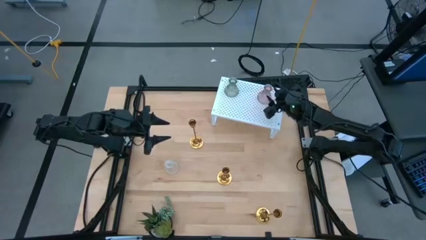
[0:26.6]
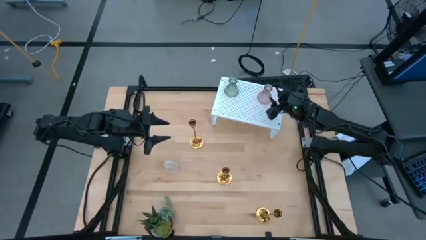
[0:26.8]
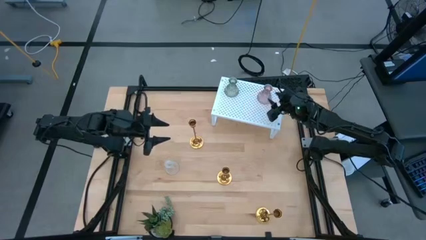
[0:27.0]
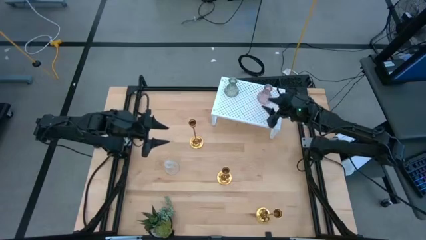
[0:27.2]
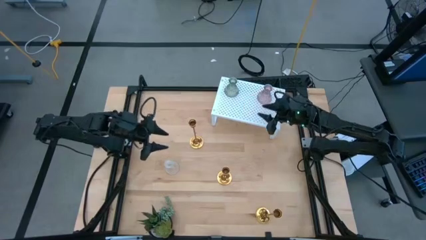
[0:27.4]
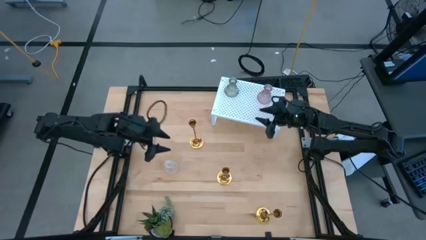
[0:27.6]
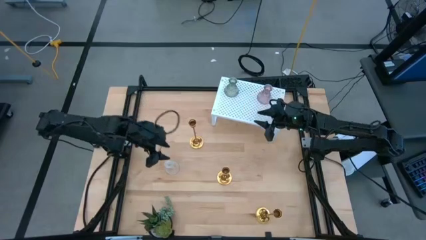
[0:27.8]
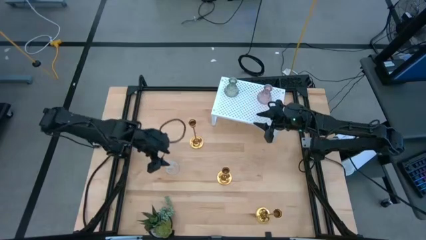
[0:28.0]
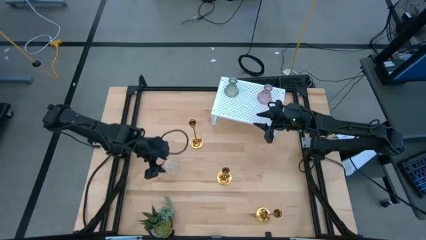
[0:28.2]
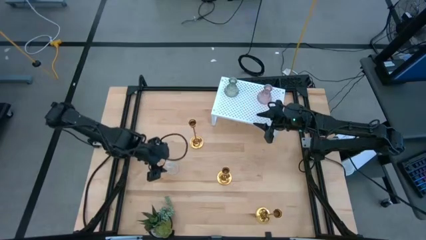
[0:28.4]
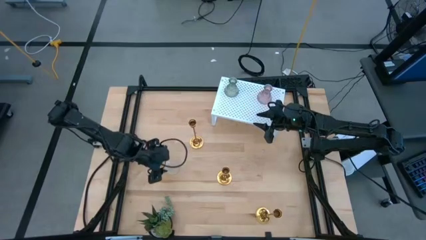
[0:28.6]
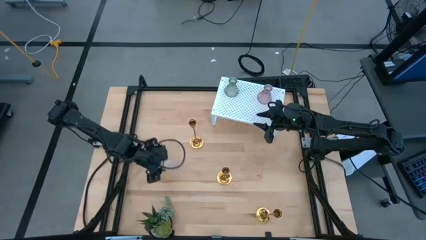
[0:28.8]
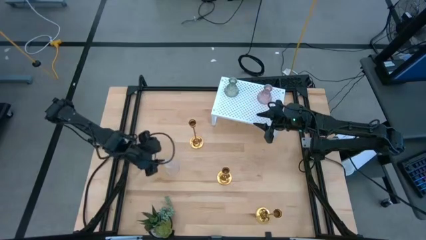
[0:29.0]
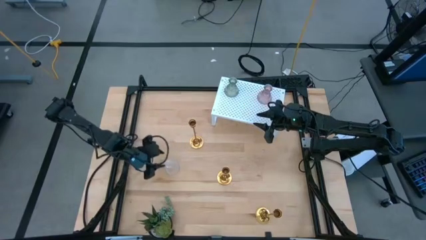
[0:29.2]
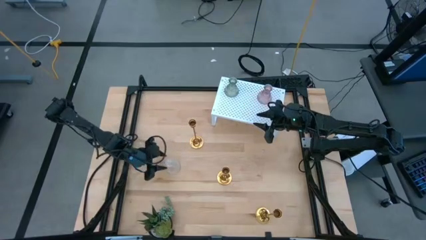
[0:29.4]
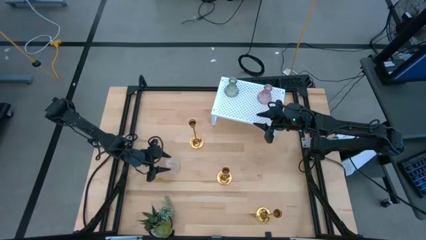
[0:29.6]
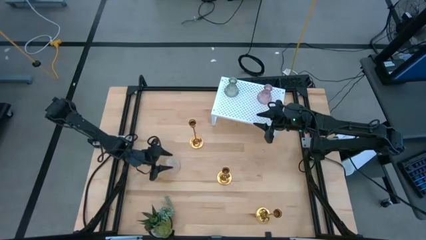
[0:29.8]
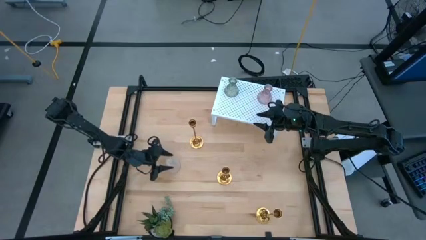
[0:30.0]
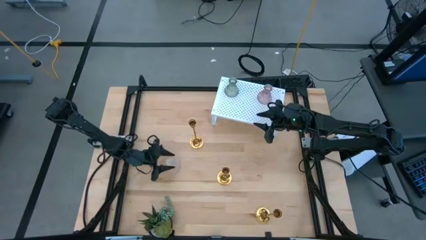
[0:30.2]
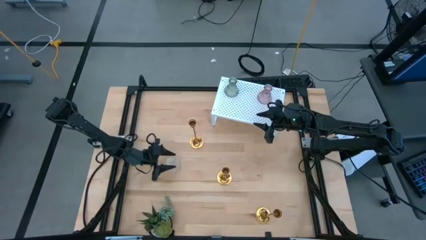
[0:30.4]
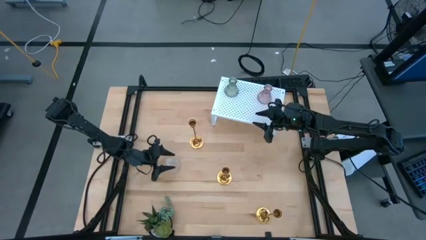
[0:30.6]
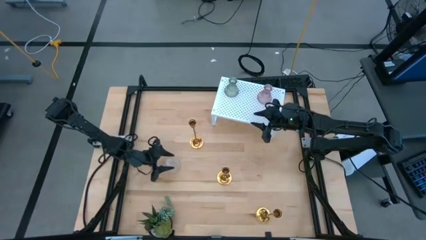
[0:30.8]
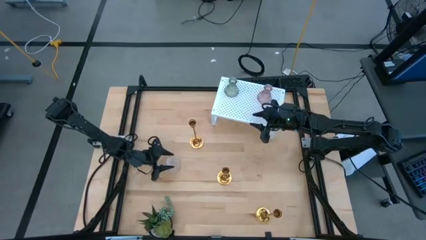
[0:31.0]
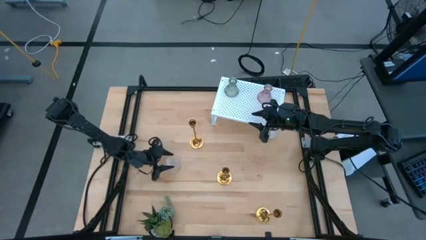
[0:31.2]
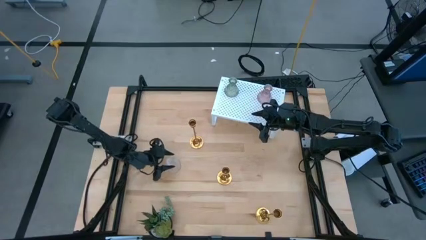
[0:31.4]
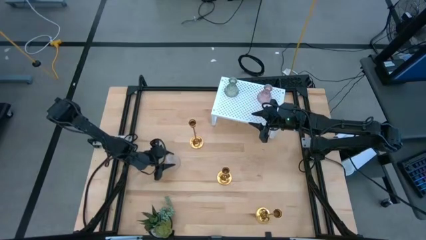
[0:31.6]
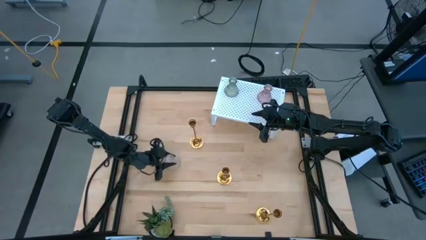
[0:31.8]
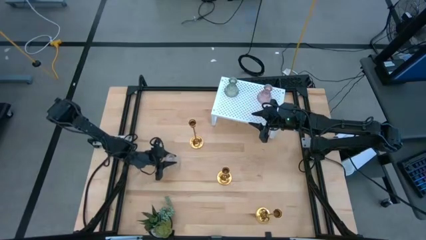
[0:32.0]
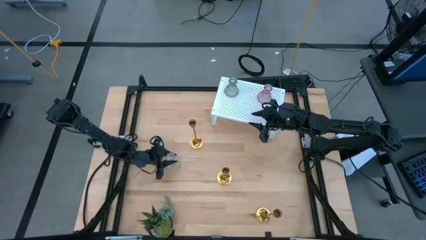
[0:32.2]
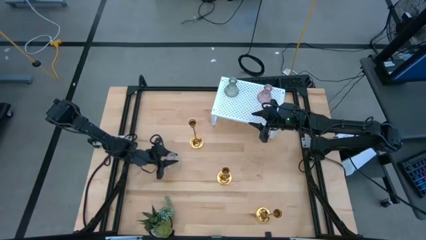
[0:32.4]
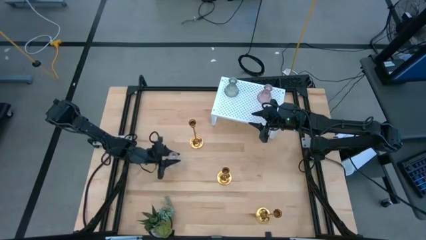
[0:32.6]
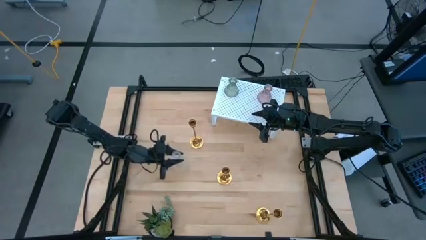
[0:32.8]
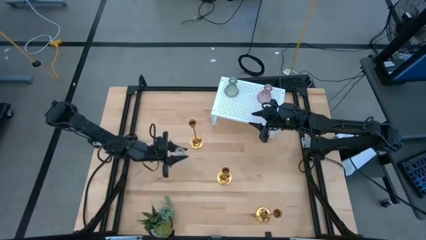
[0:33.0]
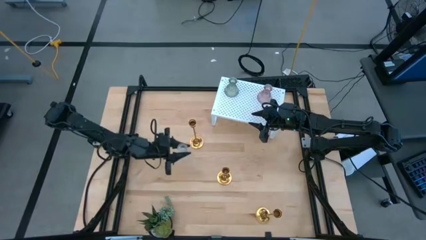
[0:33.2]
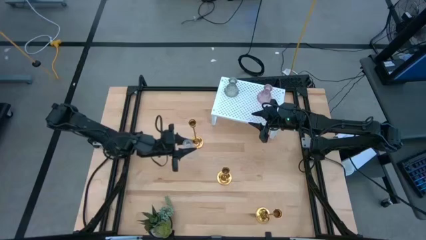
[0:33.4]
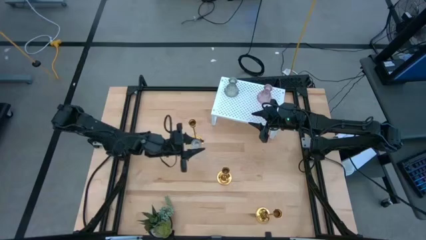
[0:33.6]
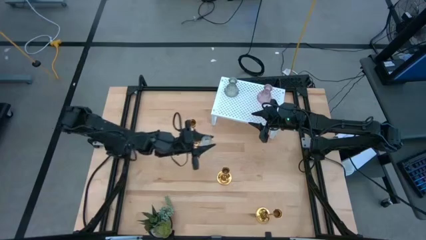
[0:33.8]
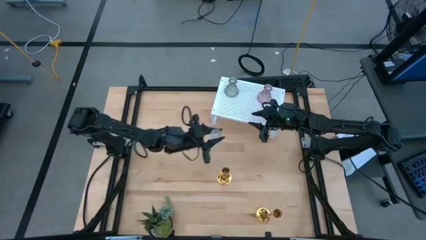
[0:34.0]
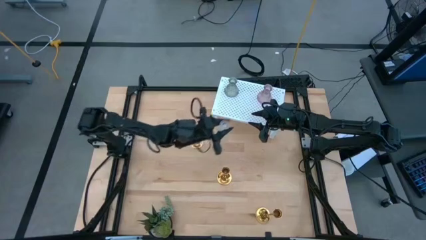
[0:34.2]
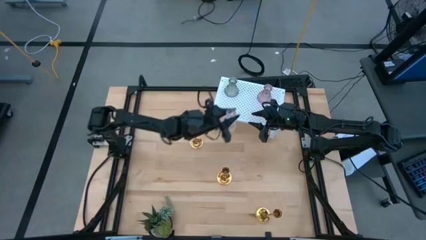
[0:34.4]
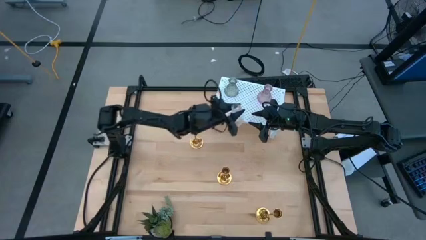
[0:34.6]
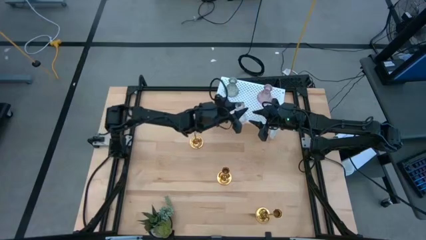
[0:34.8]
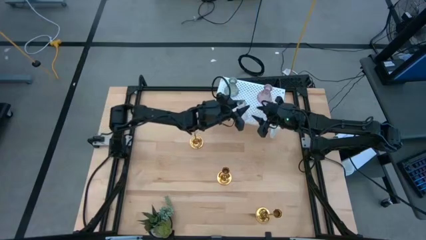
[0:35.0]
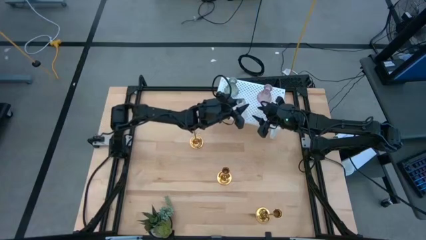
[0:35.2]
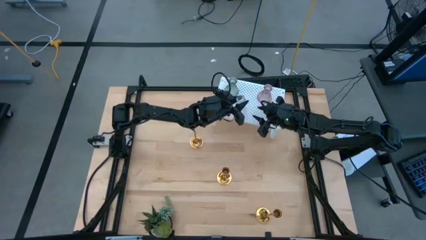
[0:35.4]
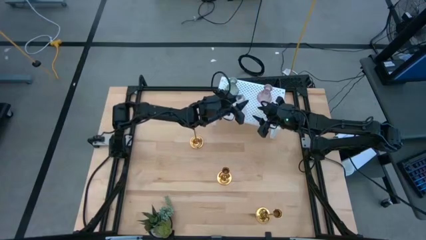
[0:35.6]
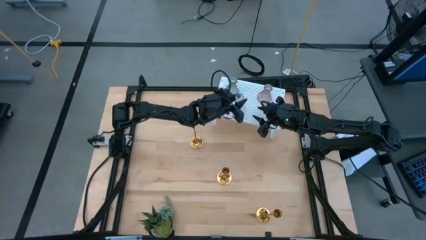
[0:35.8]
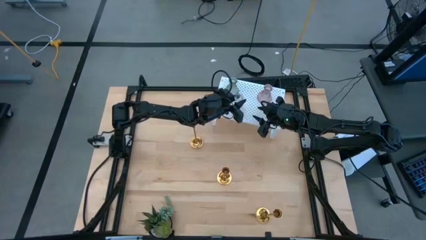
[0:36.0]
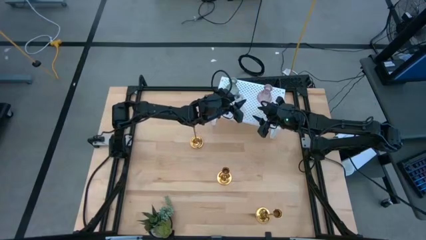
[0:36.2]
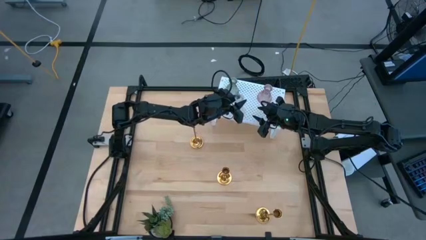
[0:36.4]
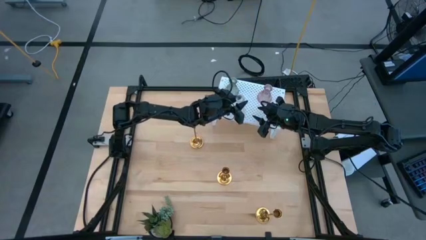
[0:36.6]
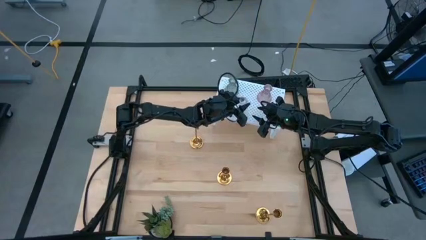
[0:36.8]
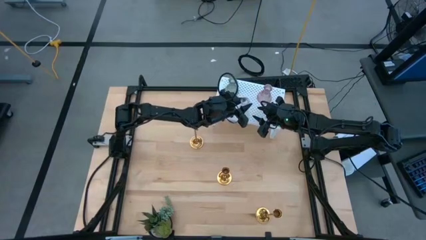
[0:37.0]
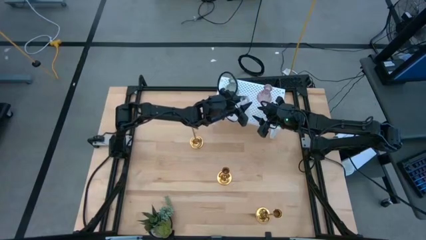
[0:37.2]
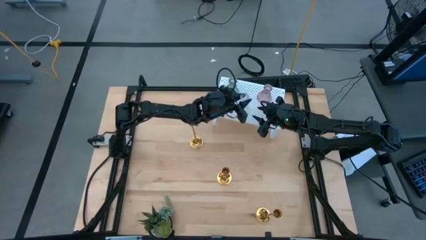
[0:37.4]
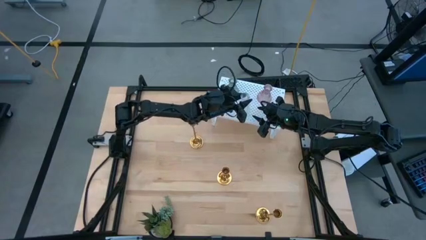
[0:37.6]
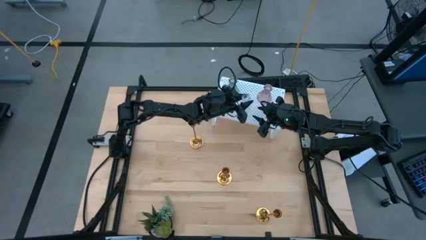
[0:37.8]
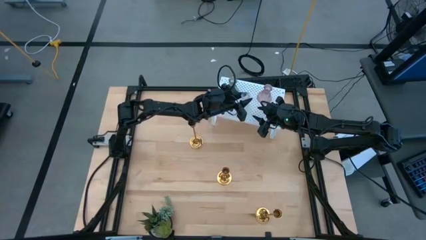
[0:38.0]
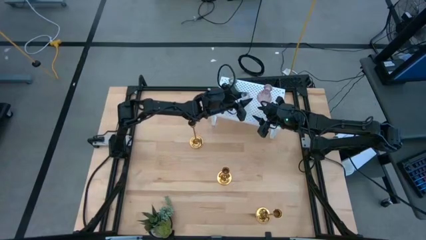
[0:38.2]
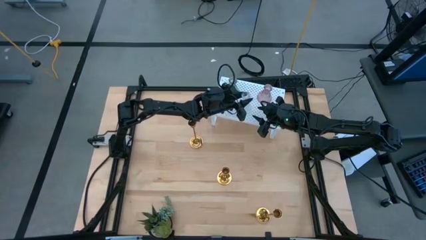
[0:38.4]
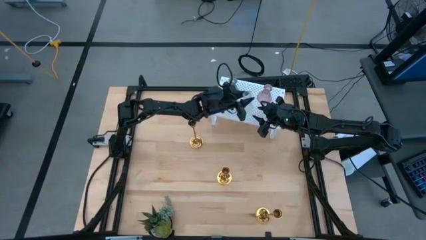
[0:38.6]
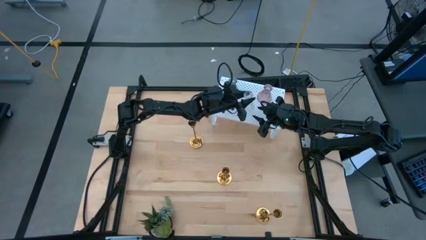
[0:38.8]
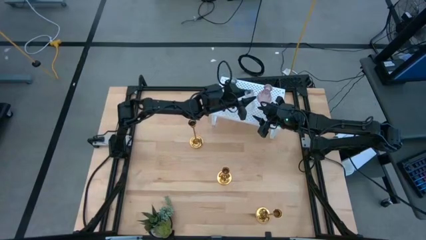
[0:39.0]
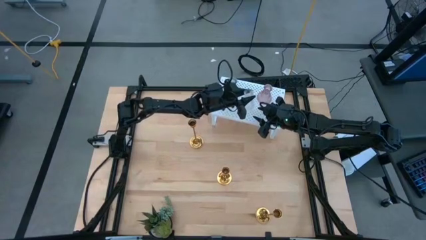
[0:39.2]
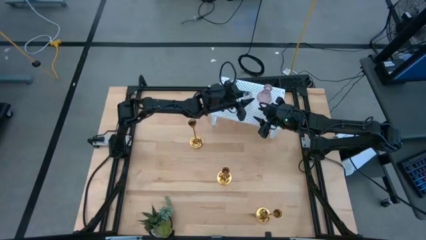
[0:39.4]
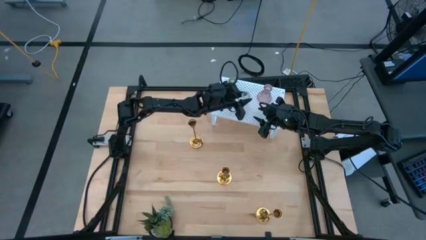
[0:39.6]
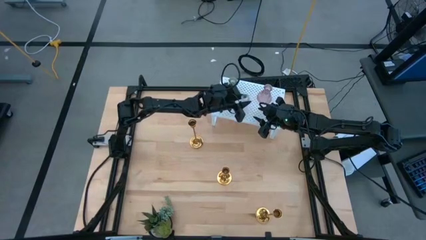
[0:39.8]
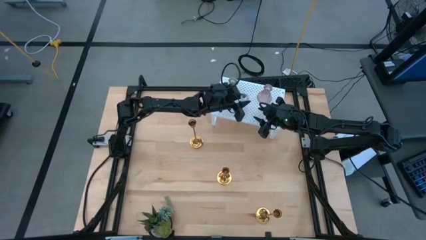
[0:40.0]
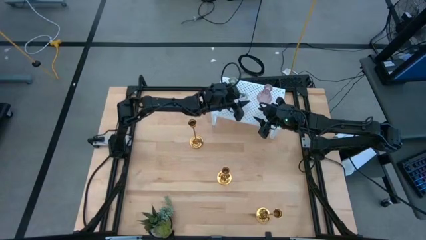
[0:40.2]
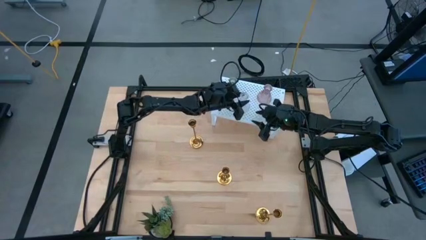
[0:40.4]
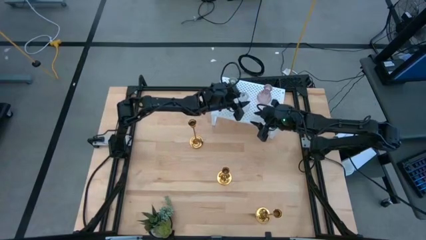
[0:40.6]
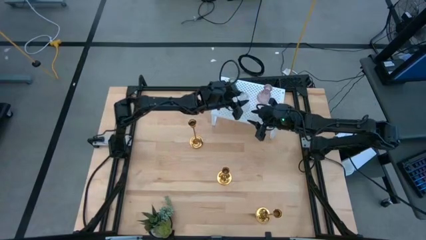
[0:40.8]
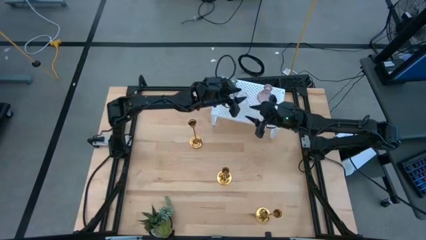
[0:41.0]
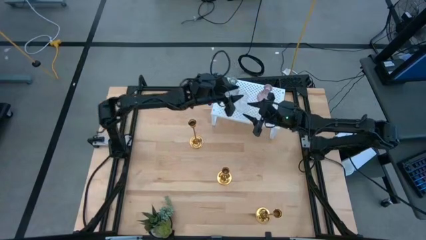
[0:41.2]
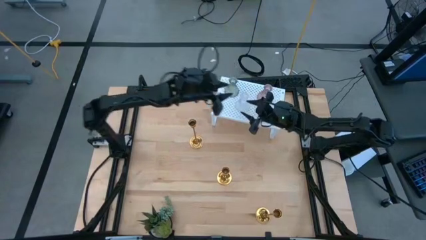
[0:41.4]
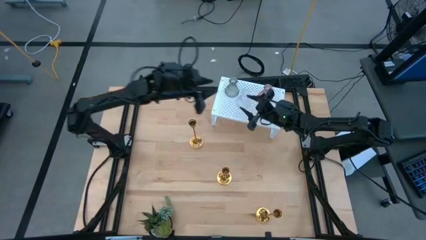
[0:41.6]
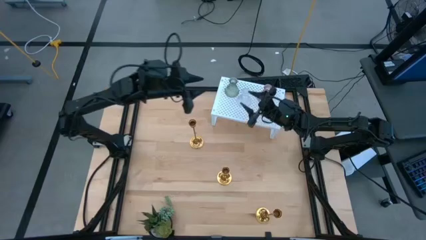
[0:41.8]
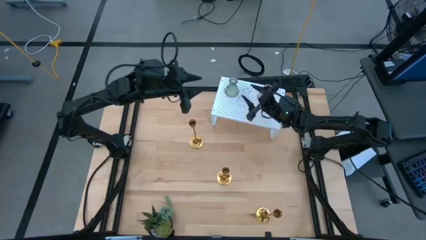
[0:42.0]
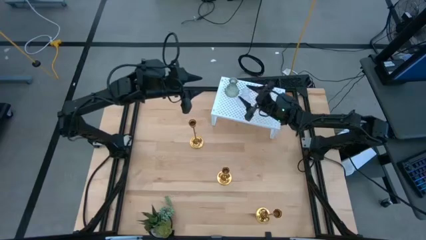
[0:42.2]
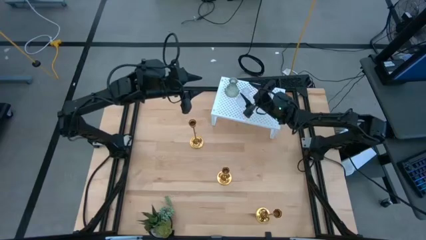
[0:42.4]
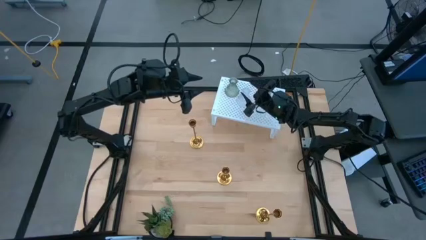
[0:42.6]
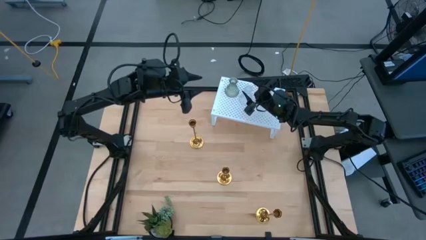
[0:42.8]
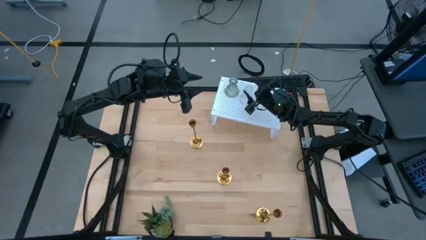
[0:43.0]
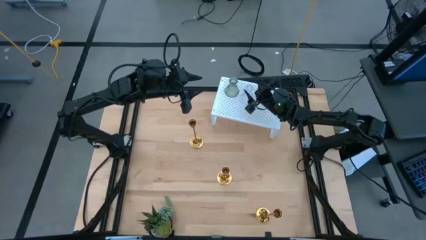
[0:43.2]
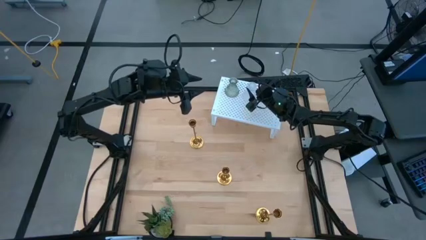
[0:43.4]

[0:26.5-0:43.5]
Task: Pick & Place candle stick holders
Put the pink glass candle holder on the shelf
